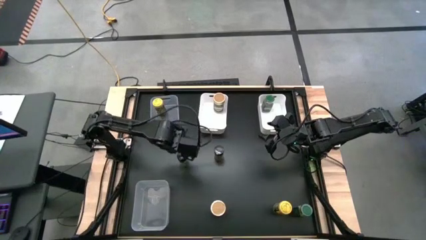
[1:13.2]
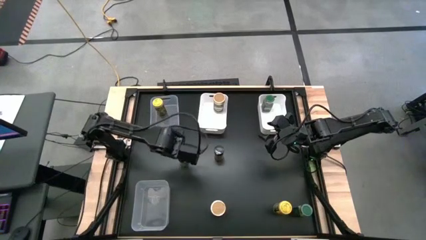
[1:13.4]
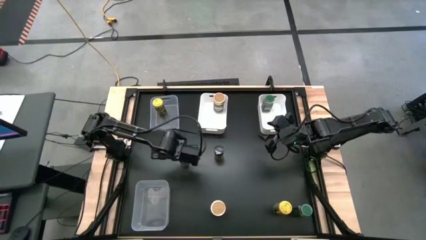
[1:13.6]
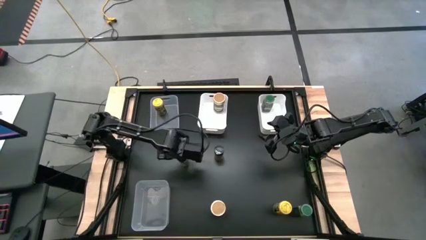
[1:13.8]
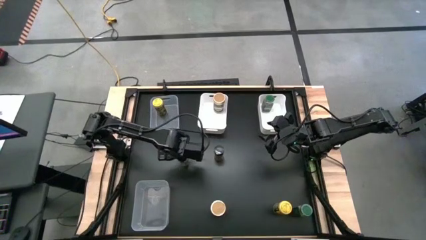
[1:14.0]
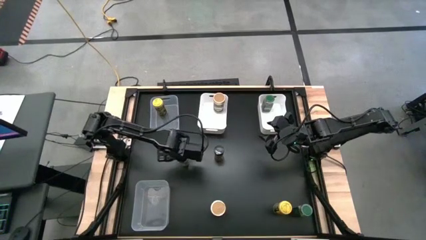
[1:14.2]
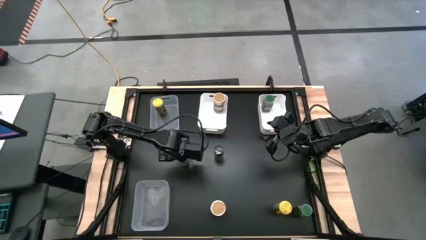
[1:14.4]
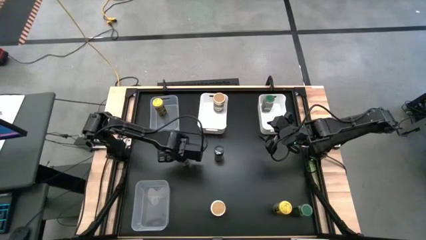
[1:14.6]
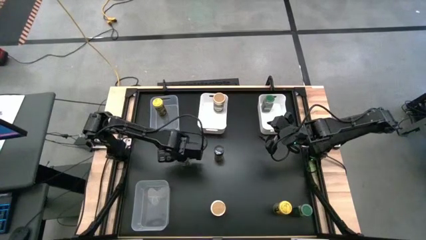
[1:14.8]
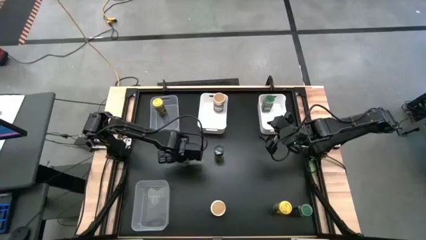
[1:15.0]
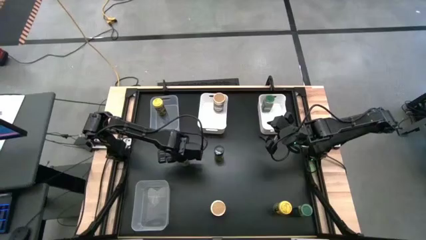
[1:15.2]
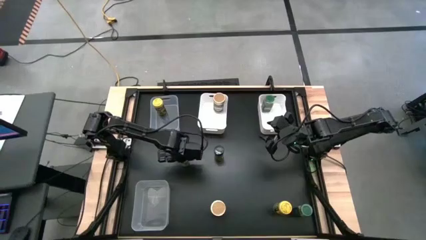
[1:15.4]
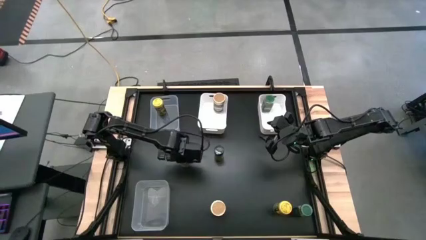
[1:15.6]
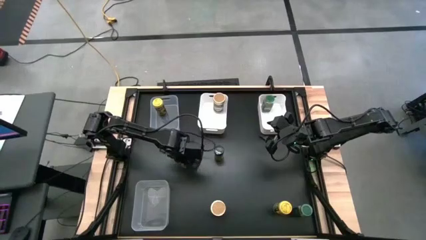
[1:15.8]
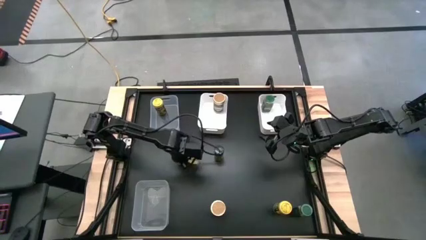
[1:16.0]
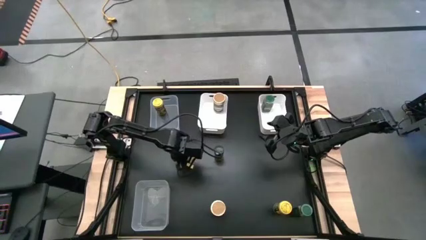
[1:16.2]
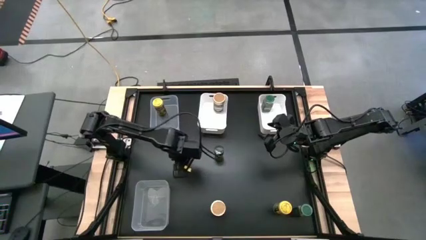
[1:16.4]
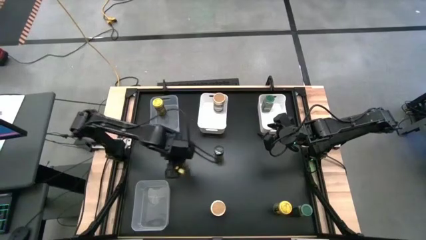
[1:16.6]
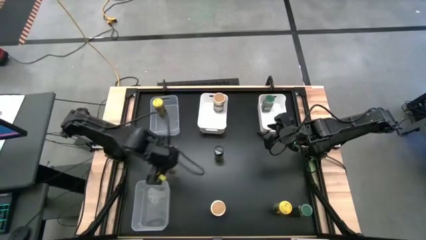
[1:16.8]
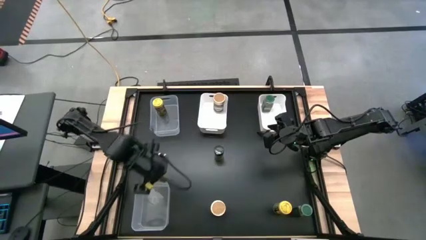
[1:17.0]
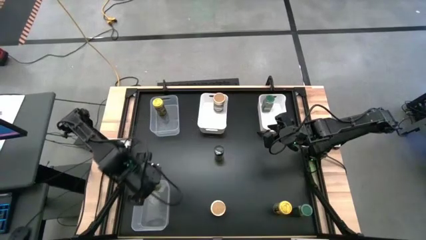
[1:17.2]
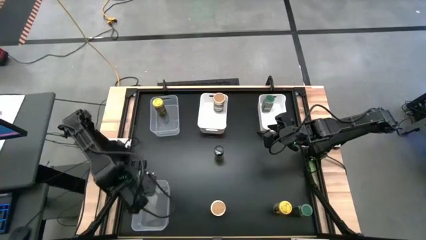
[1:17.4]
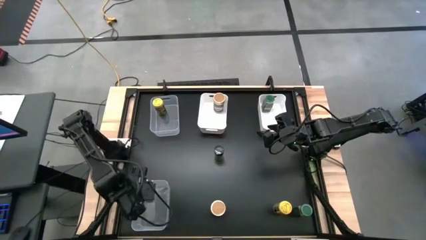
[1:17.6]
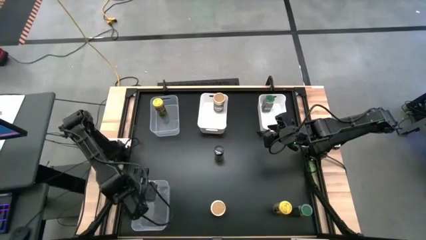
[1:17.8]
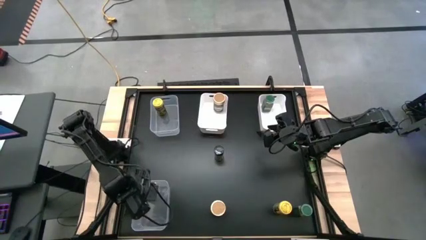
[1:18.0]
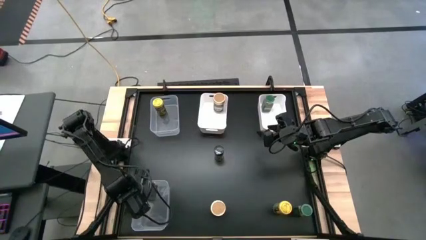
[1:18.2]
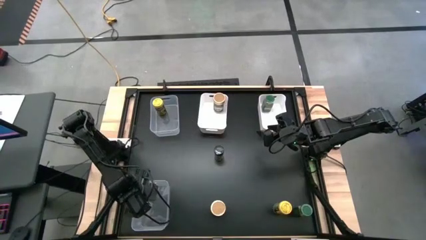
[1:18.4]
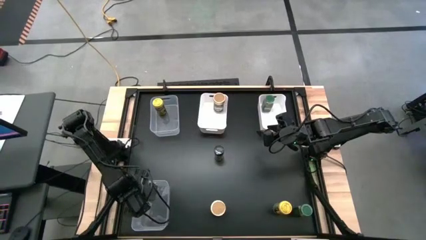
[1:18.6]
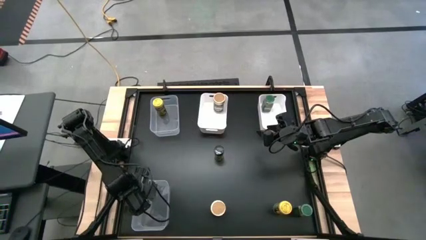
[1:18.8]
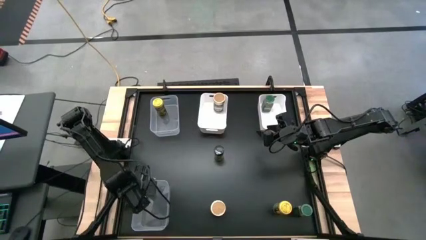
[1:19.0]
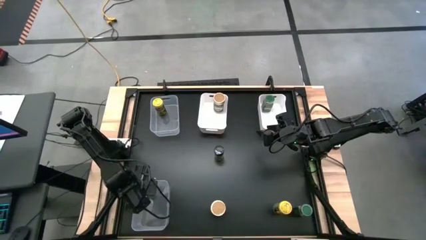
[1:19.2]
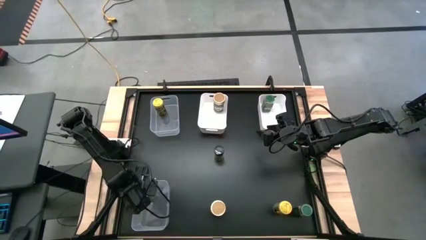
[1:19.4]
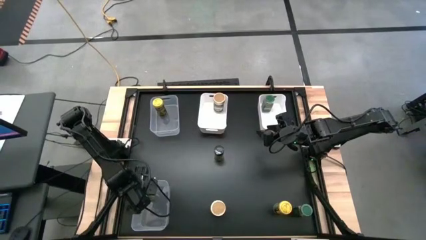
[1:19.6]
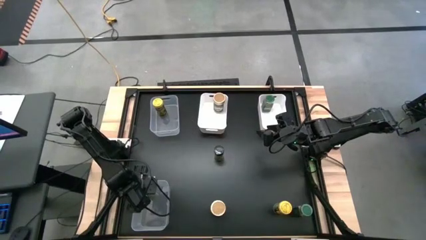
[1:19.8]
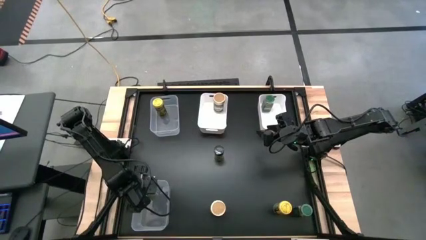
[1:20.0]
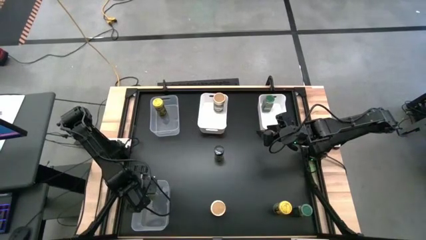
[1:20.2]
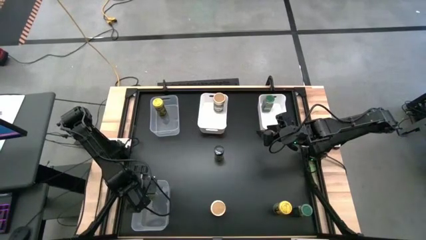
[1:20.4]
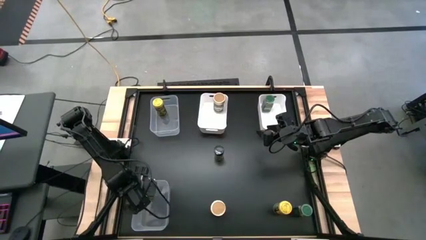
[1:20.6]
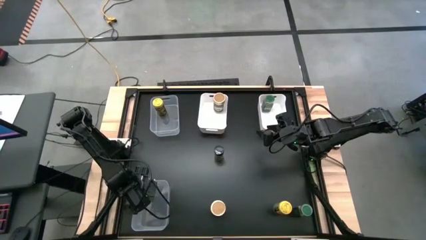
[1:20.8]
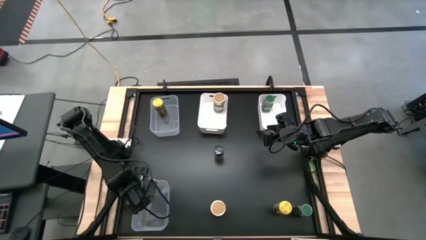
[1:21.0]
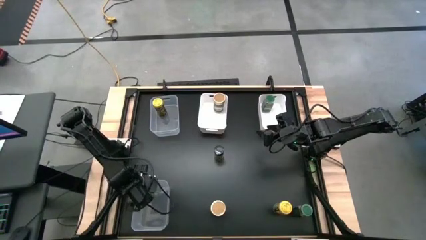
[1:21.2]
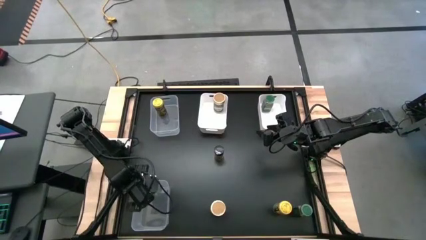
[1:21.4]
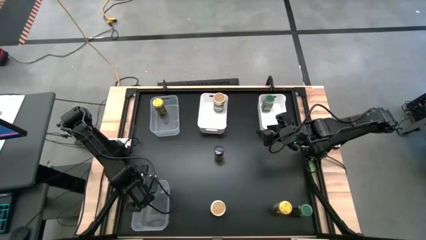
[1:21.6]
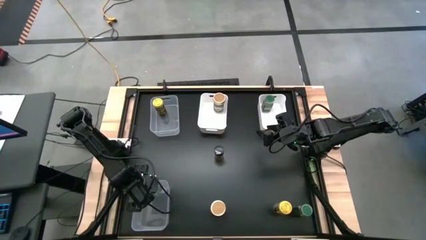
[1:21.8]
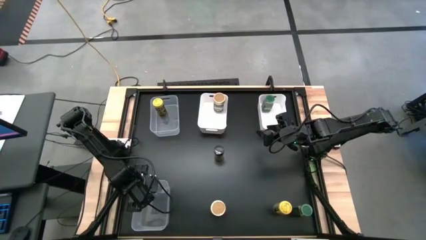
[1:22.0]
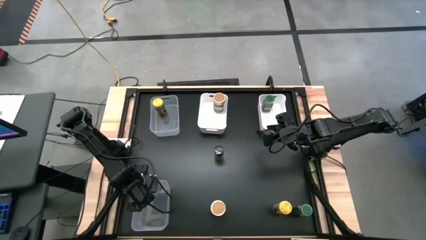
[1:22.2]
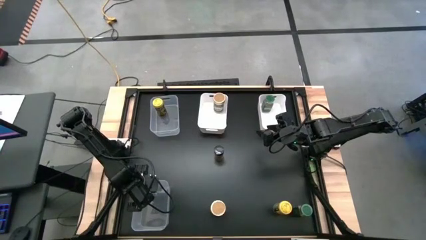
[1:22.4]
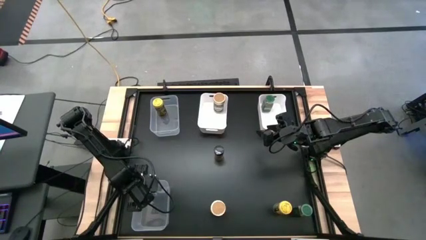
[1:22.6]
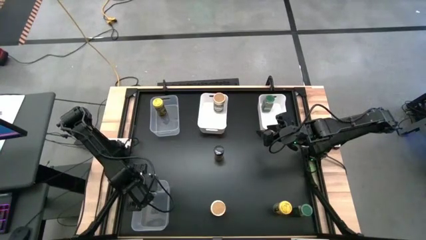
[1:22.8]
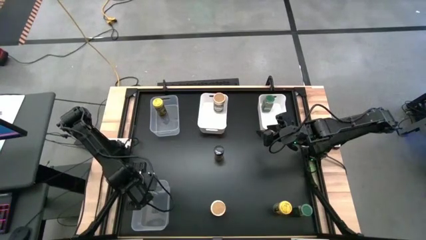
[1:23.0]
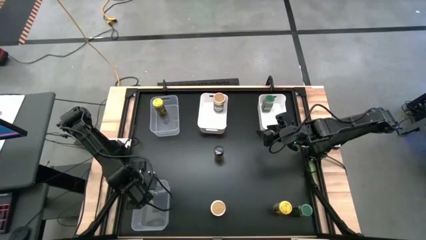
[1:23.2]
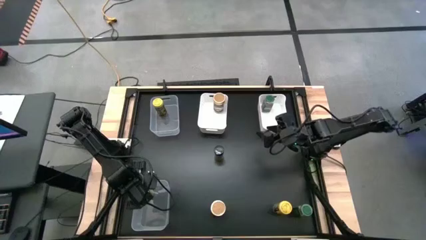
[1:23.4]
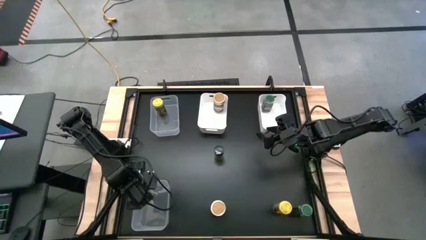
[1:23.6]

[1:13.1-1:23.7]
Task: Sort spices by type
Put the left black spice bottle into the bottom transparent bin
